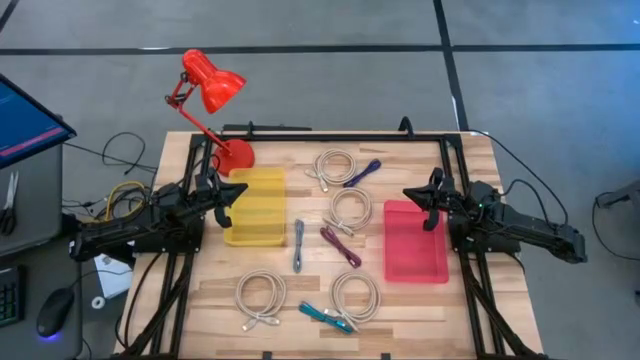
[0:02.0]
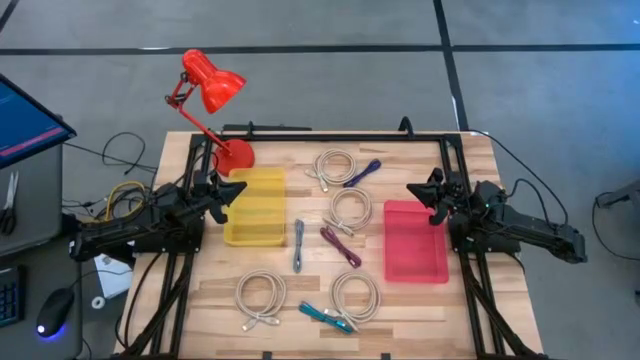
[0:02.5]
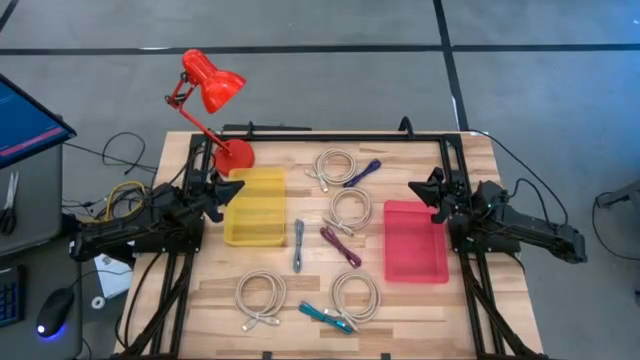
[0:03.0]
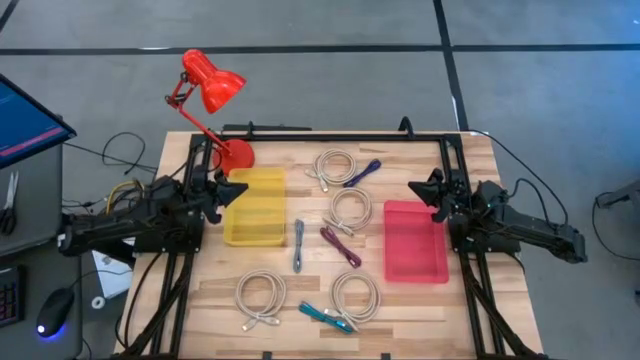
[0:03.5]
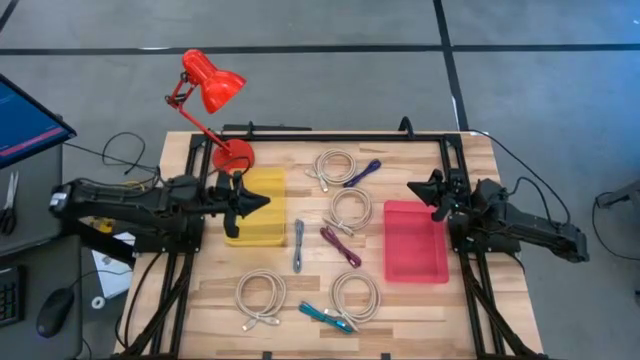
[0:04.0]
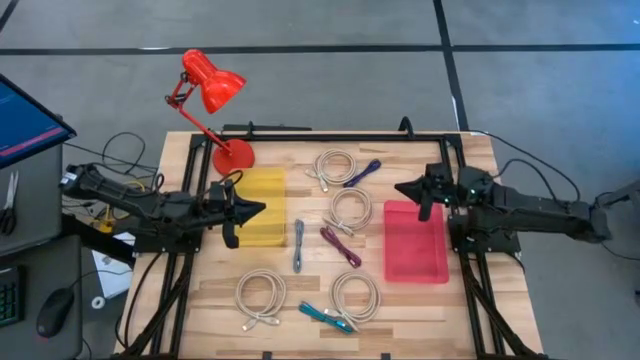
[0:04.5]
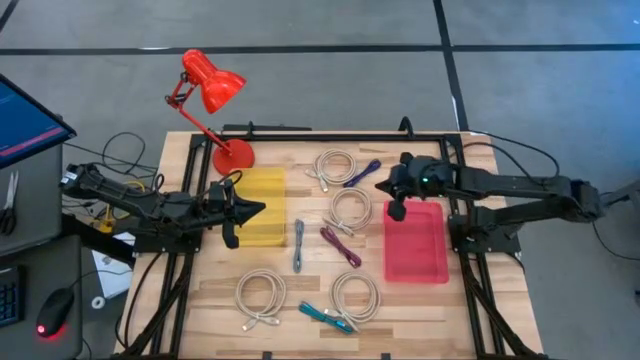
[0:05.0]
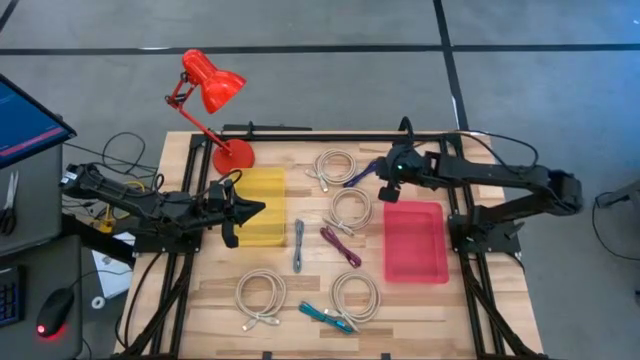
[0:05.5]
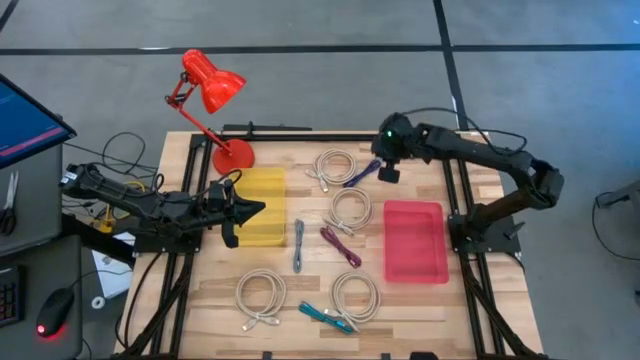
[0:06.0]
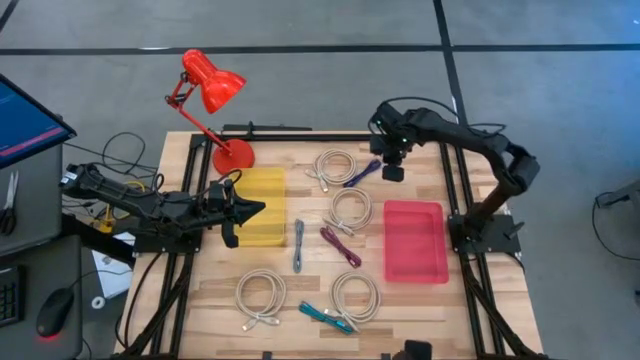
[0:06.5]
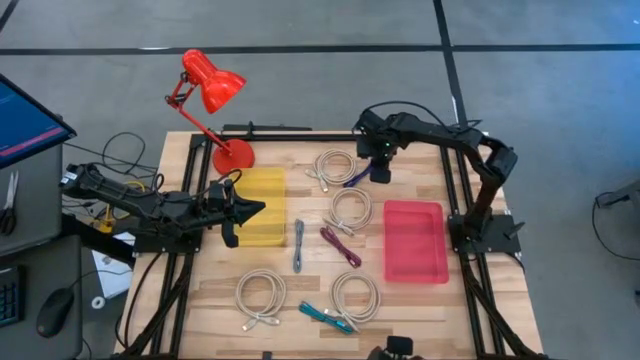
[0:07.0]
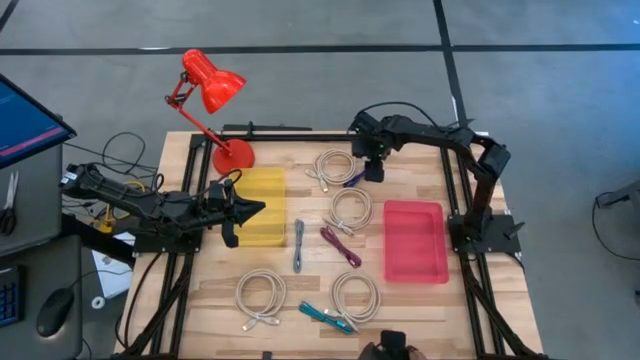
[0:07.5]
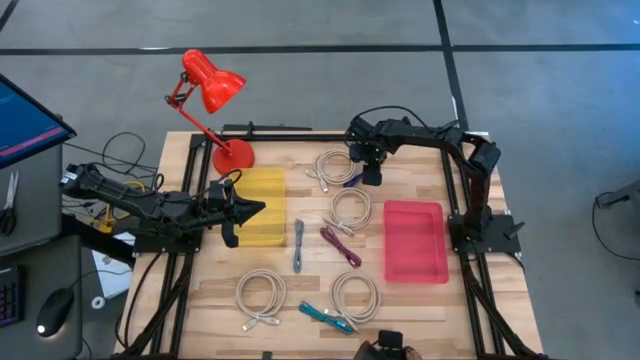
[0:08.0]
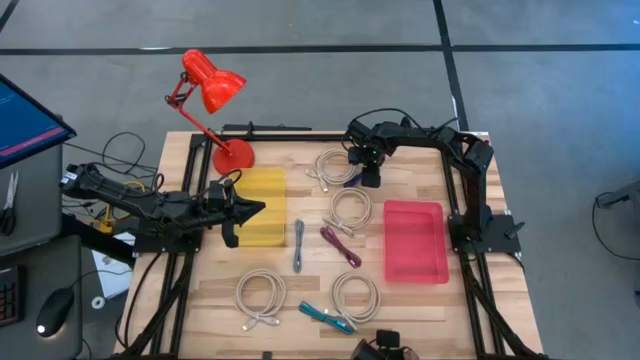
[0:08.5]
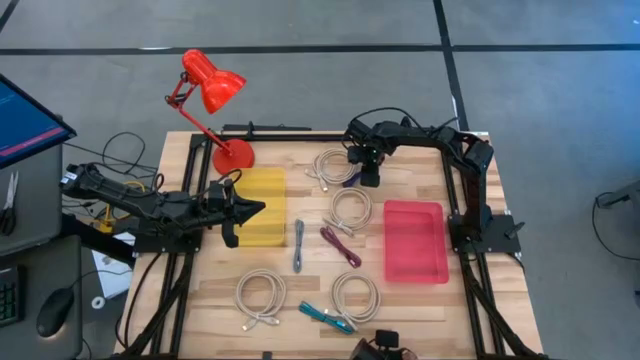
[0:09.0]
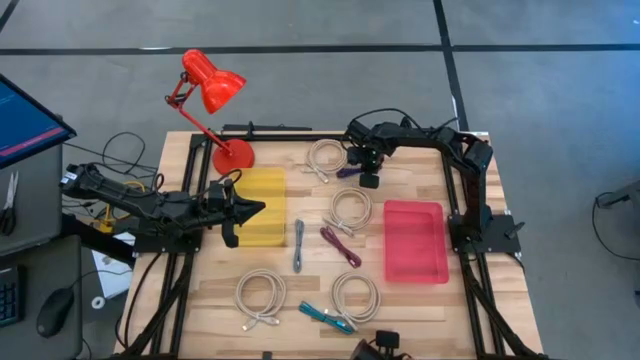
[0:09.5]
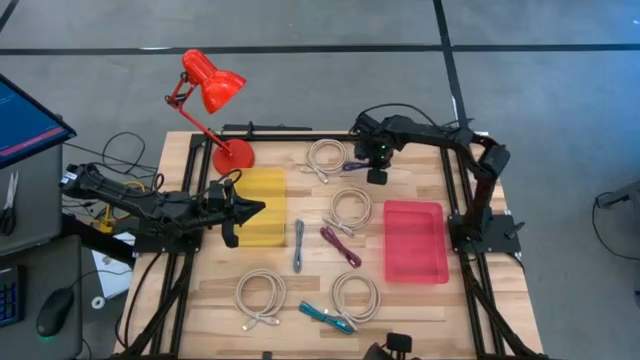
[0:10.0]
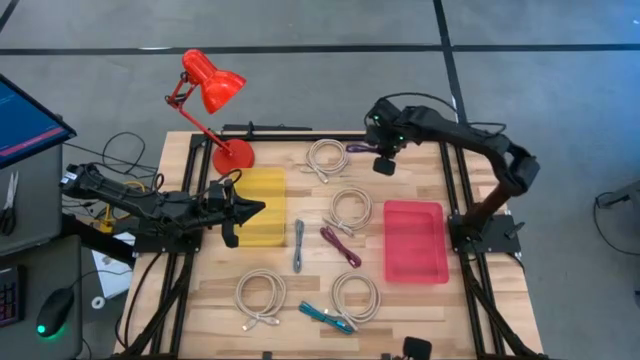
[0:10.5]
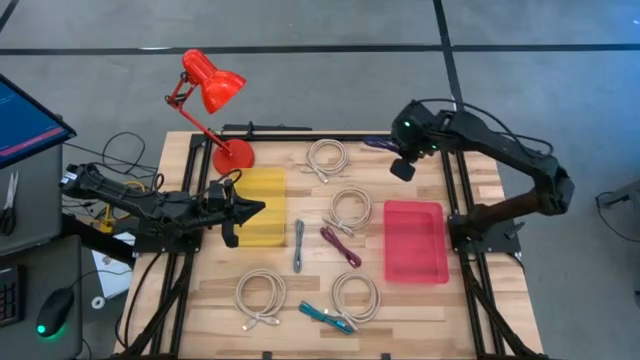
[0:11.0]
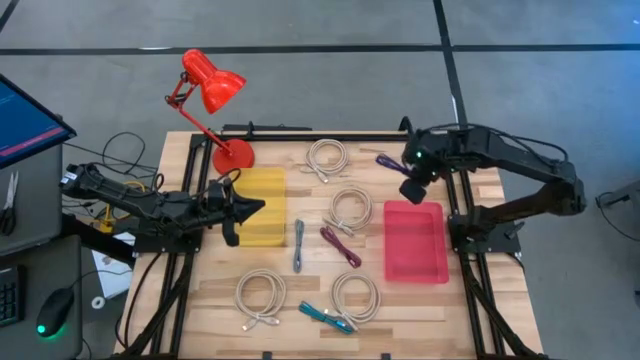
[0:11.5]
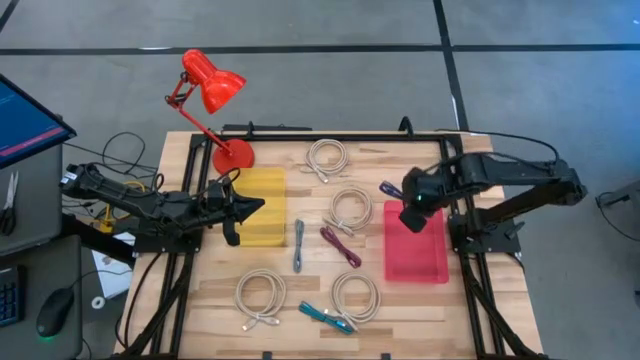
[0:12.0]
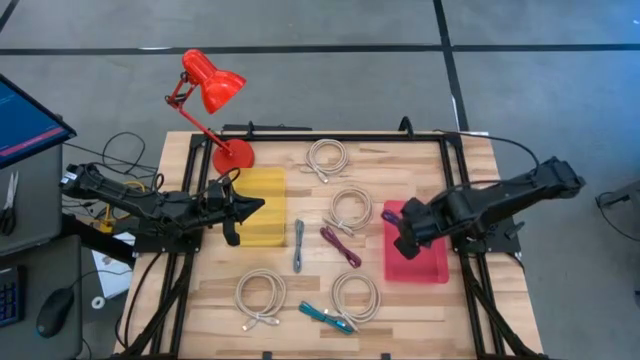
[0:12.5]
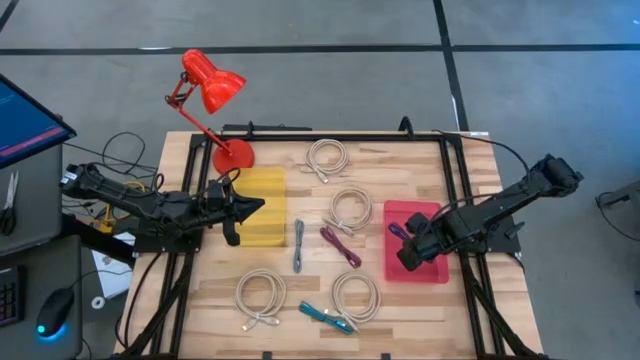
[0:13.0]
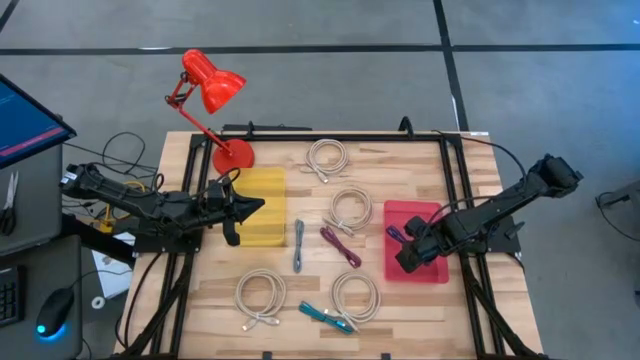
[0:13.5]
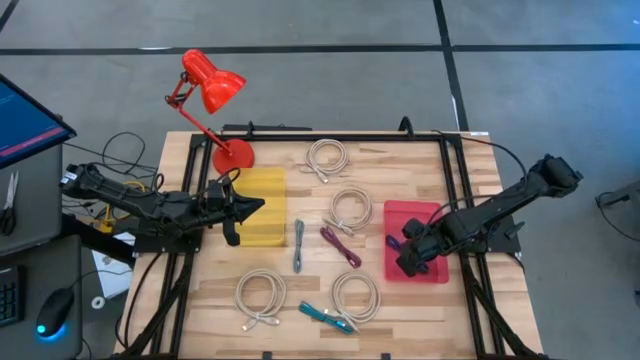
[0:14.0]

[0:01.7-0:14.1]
Task: Pick & Place USB Port
Put the black and violet charger cable into the pink bin

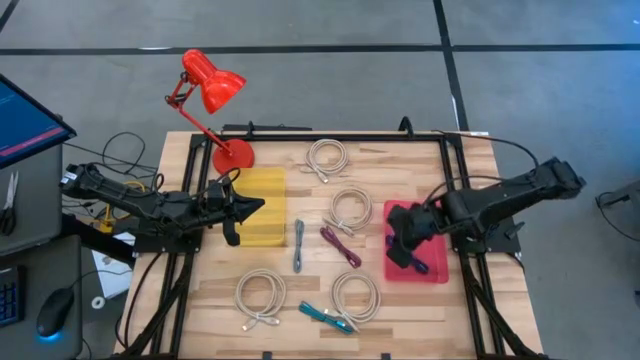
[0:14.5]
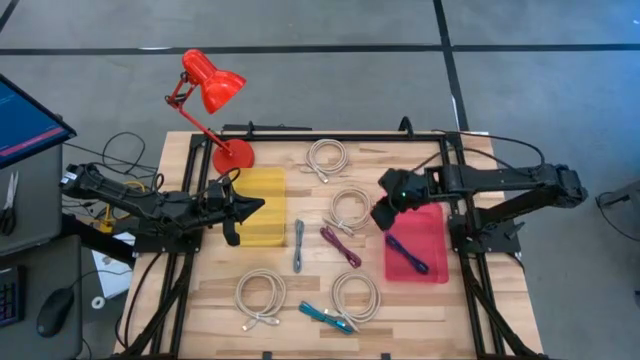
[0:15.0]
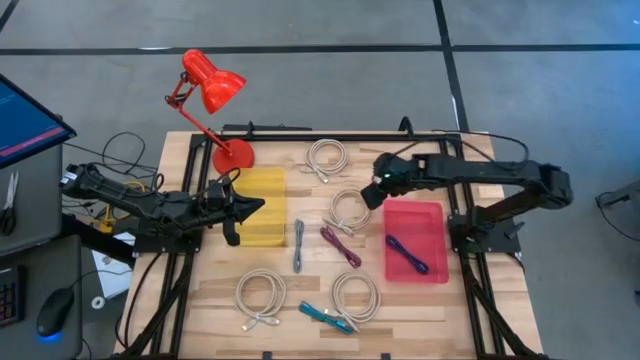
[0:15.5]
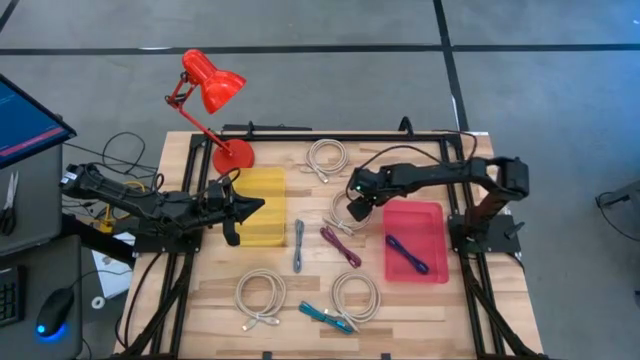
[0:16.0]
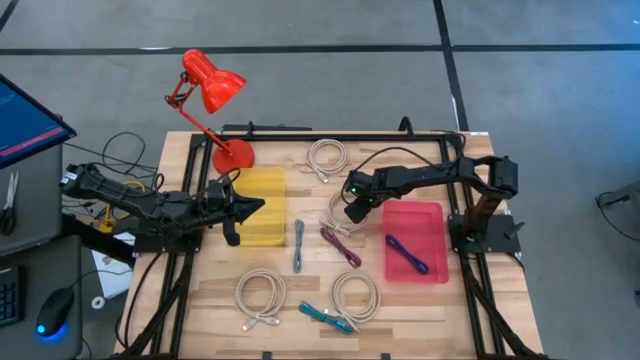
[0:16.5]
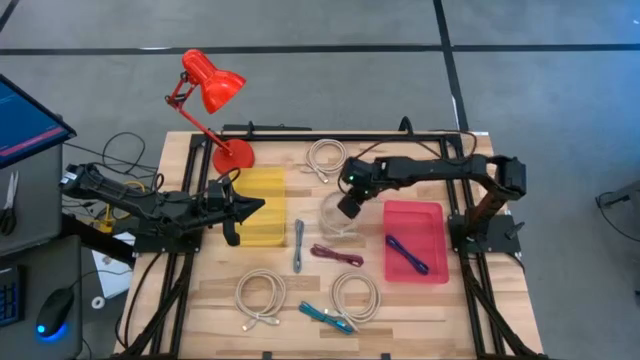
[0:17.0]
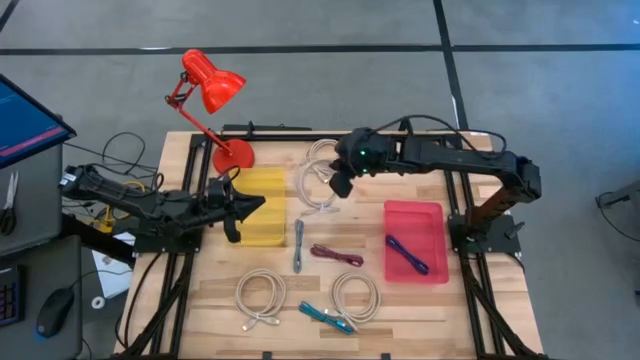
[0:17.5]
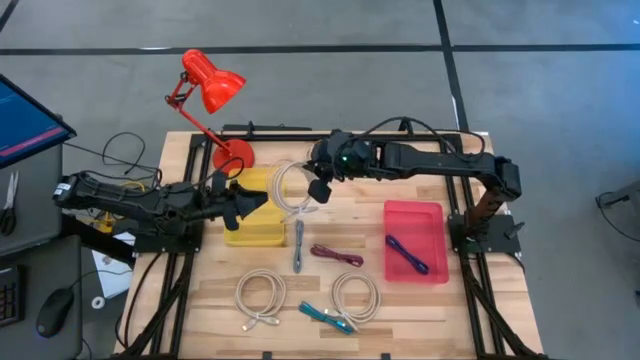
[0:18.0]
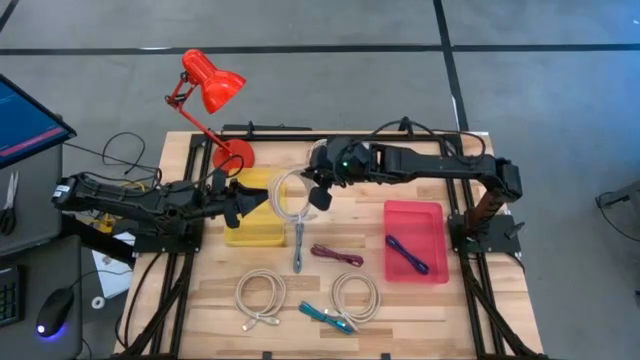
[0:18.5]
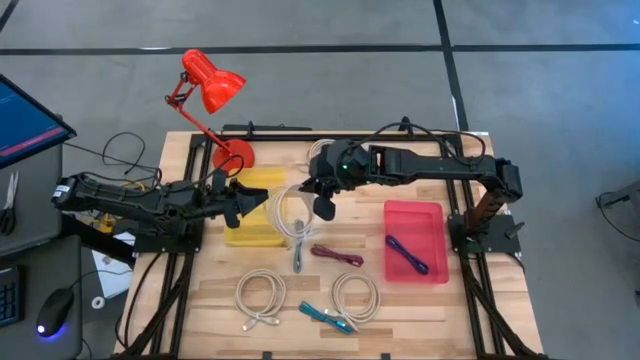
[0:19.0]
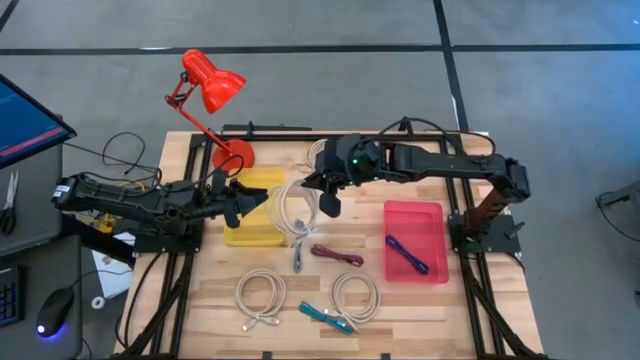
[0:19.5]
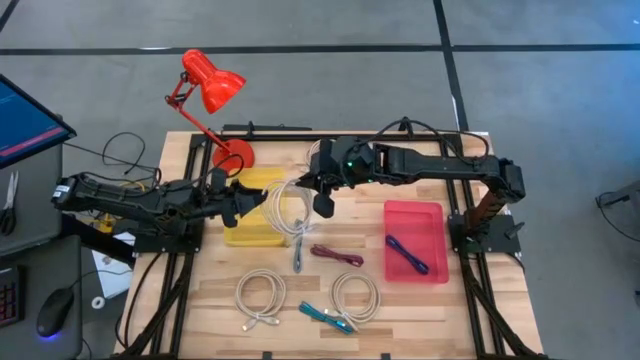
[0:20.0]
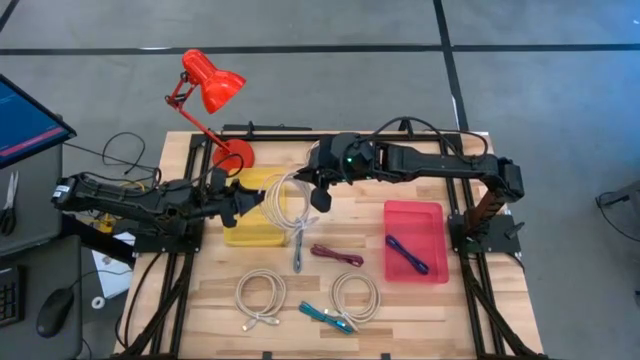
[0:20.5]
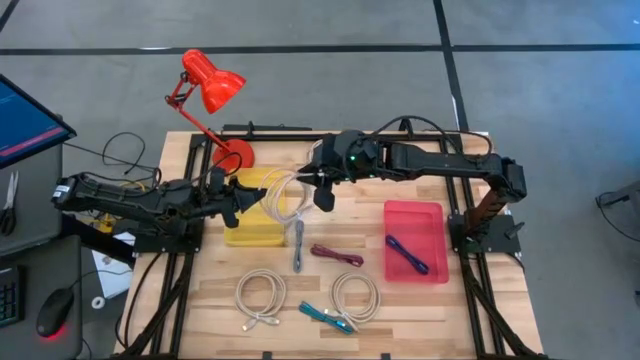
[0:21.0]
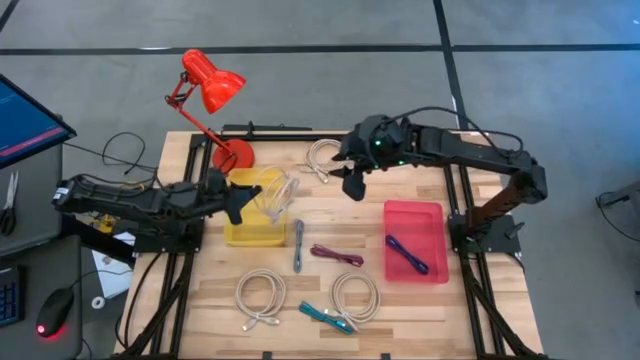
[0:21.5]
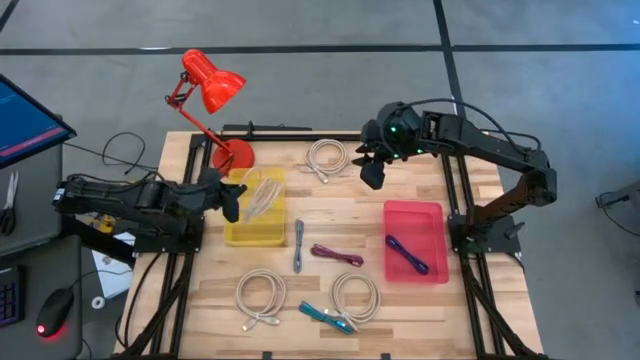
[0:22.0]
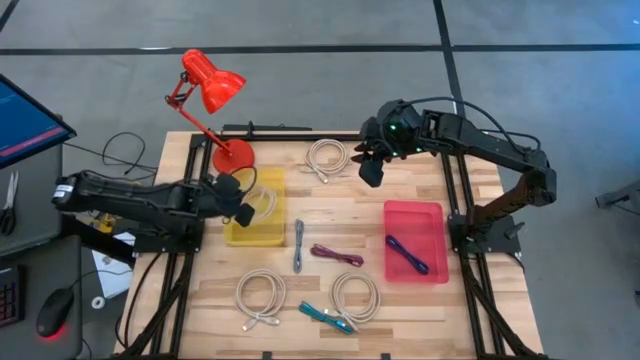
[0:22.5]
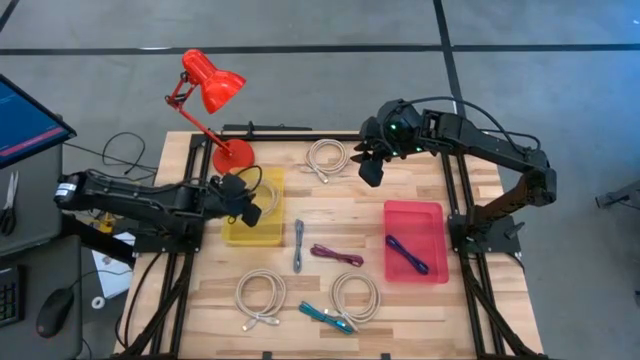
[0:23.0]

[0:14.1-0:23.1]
Put the brown HDMI cable into the yellow bin
